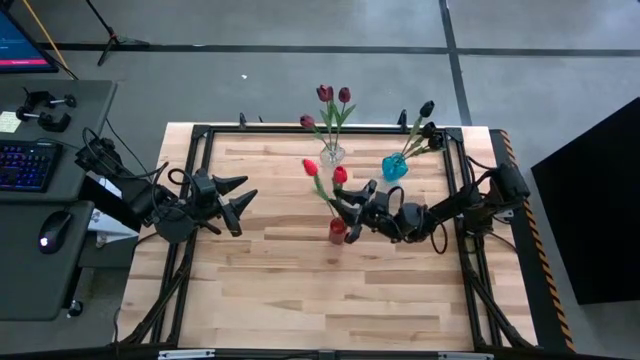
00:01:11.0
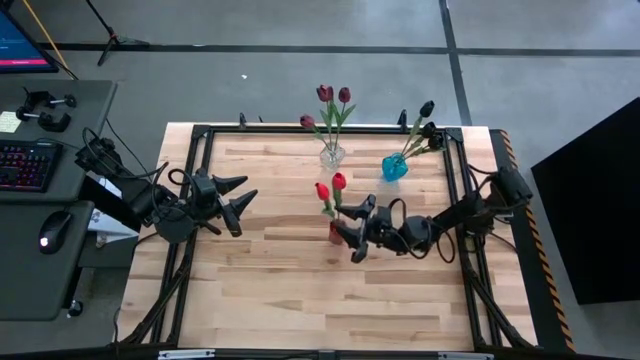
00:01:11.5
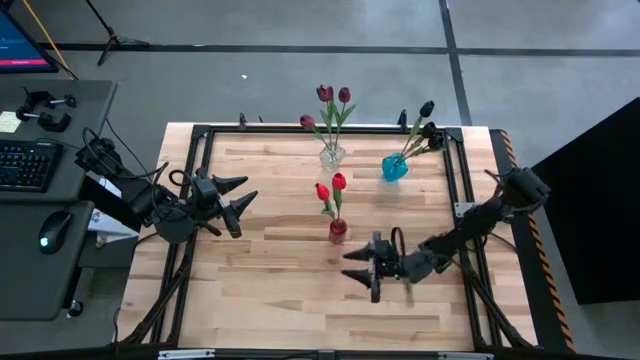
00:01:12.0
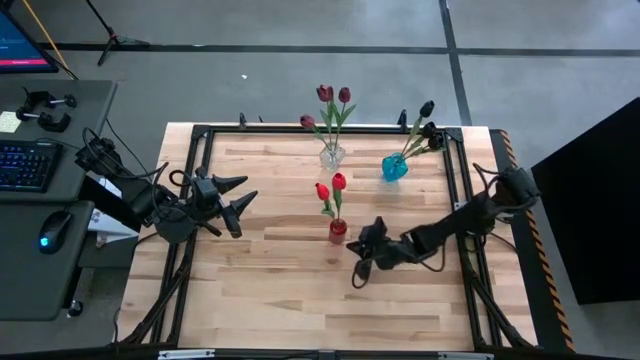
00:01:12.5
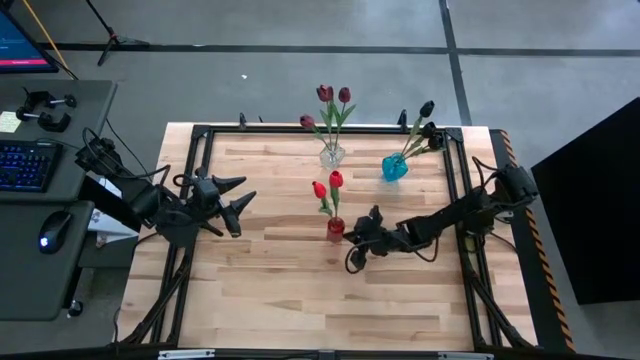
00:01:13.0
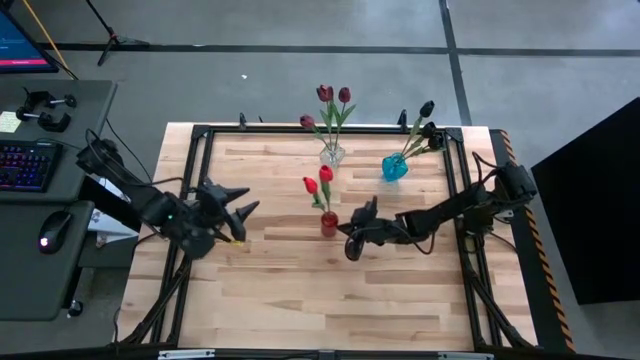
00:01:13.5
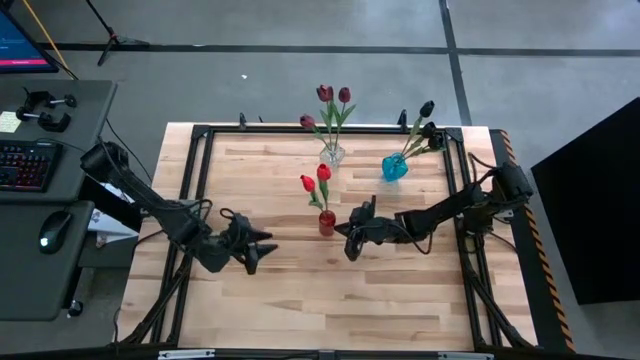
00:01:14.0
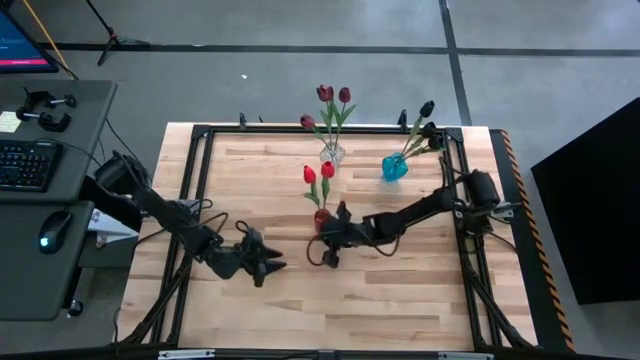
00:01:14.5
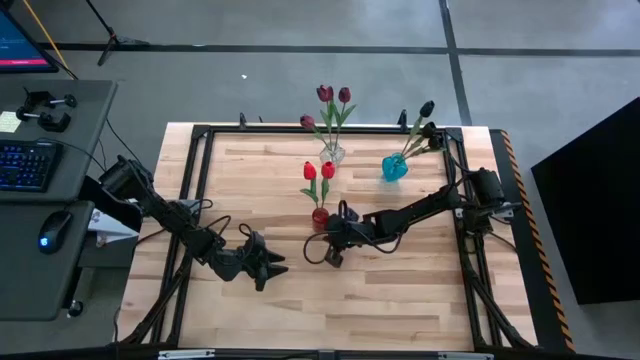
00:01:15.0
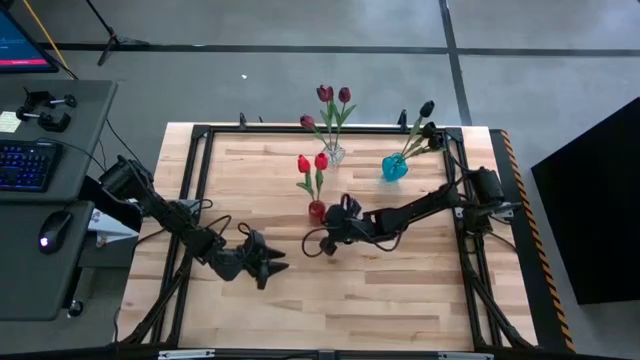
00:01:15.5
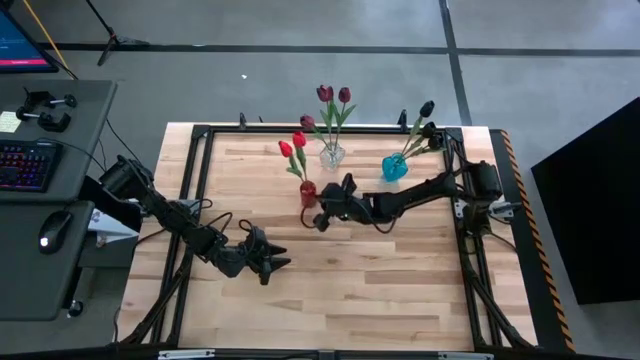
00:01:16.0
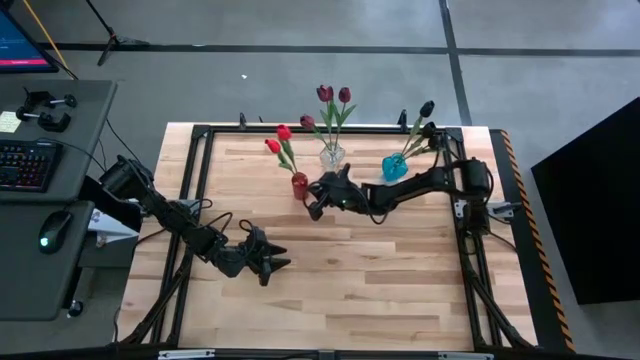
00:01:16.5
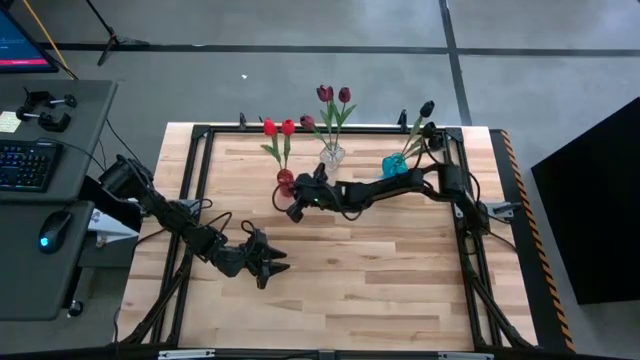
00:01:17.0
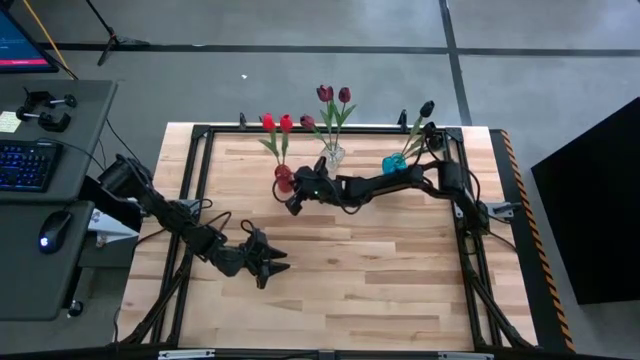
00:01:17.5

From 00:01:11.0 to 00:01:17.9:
Task: Sort flowers into vase by color
Move the red vase to the top right of the table

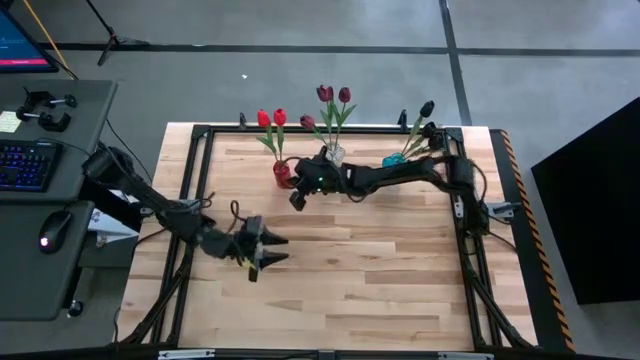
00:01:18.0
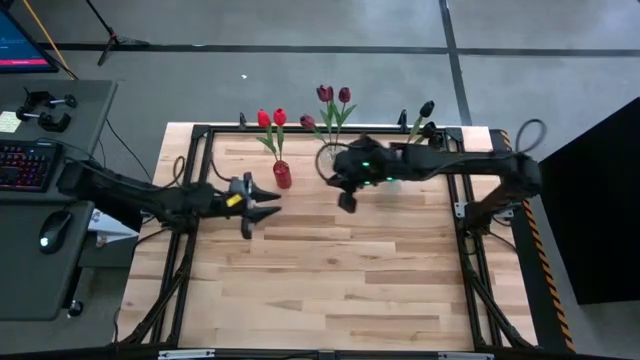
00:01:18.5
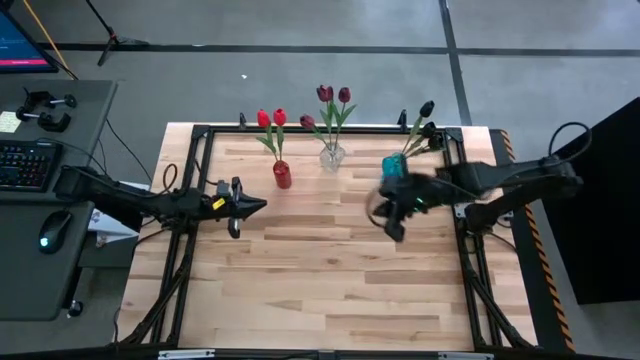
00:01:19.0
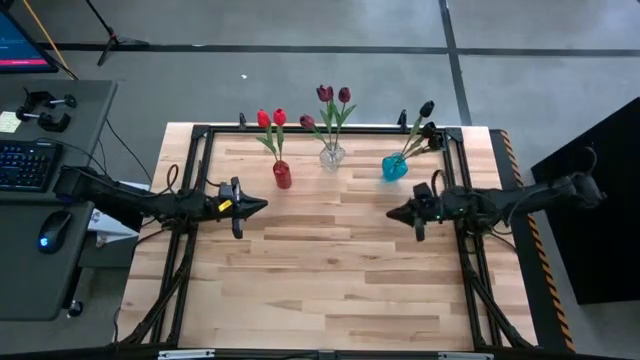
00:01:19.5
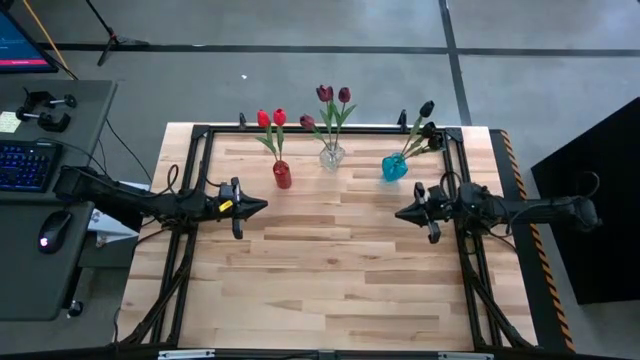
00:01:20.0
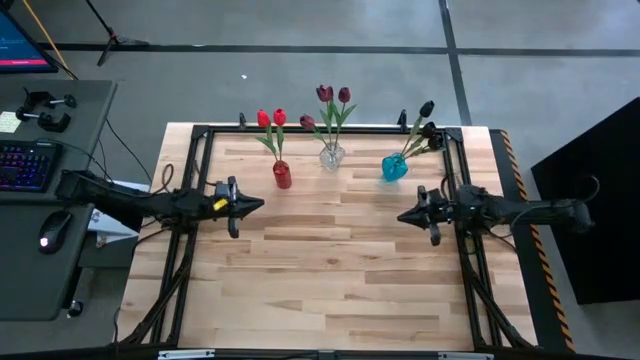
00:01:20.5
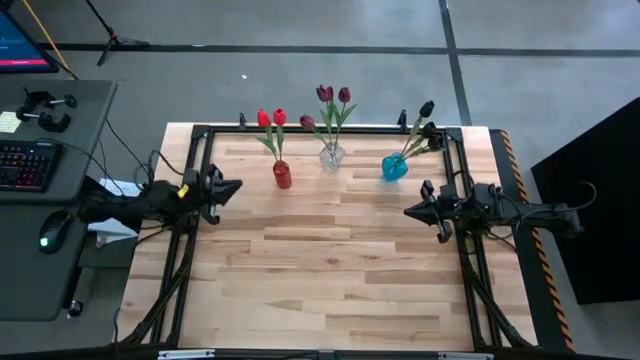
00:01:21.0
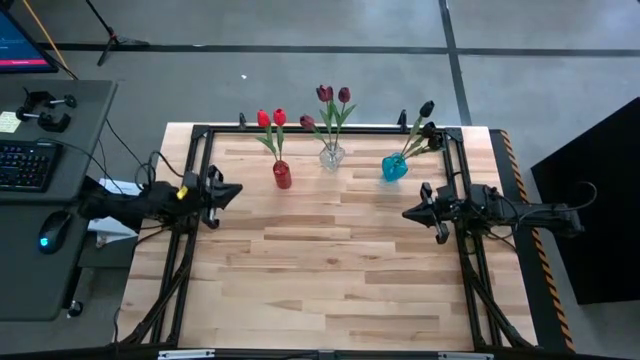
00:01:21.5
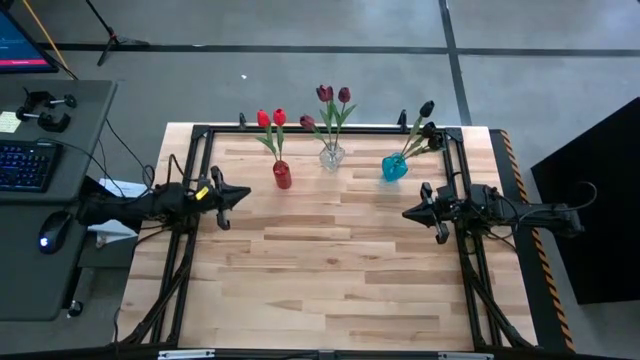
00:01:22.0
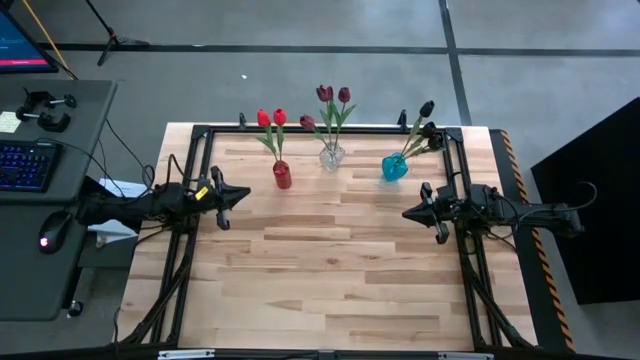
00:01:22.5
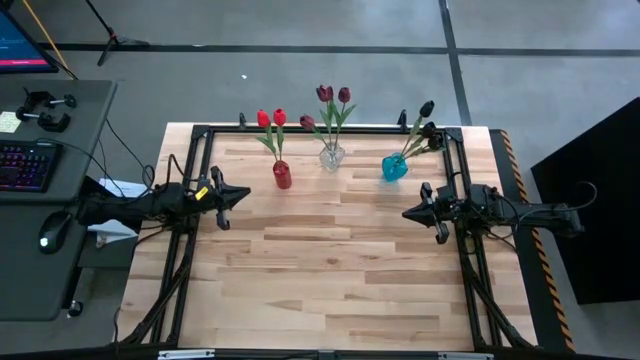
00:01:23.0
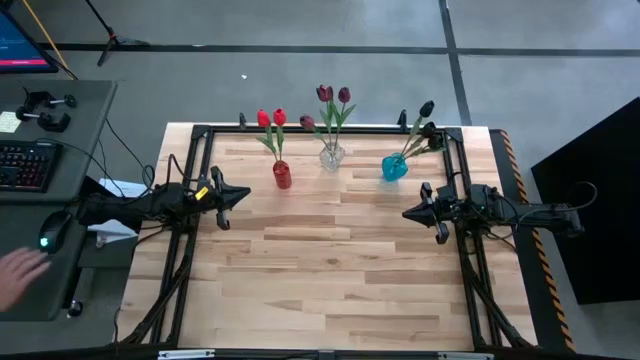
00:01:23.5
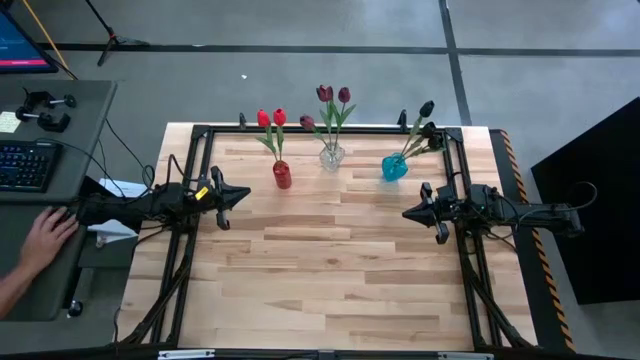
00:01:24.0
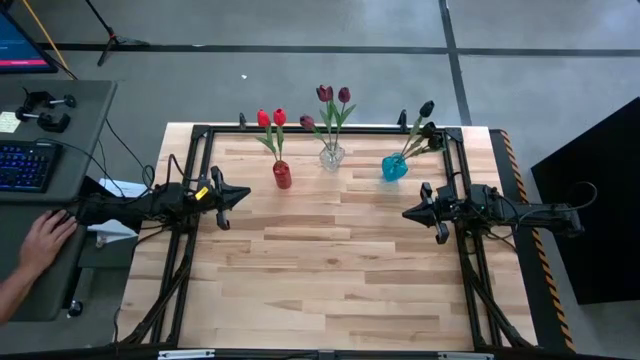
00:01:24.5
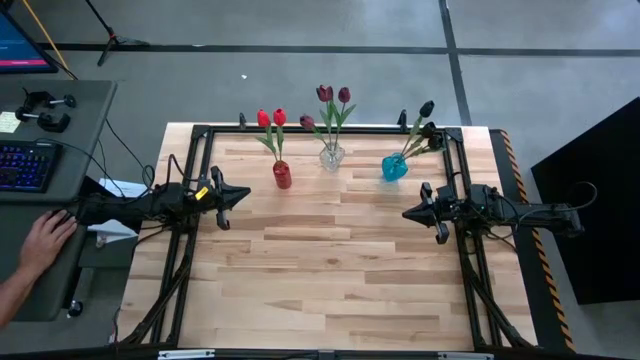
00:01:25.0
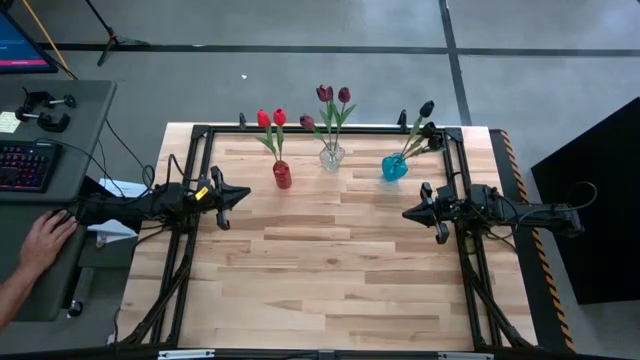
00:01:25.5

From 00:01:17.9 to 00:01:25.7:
Return to Home Position

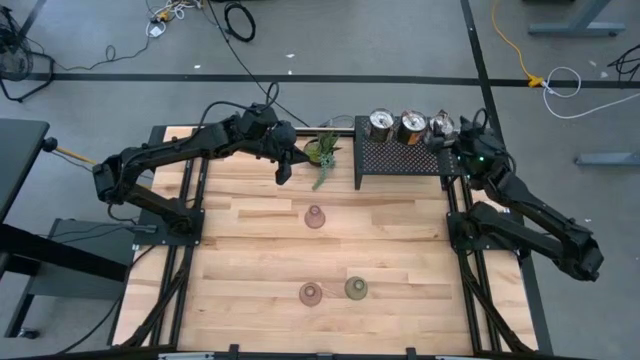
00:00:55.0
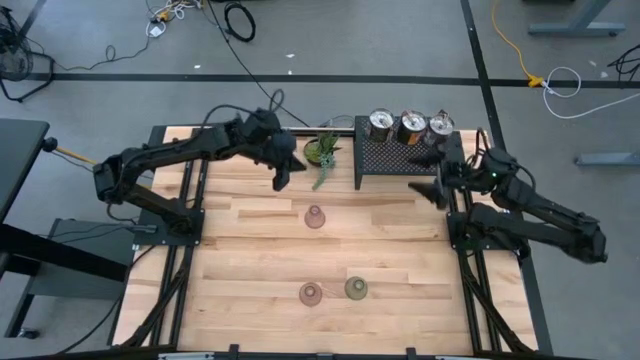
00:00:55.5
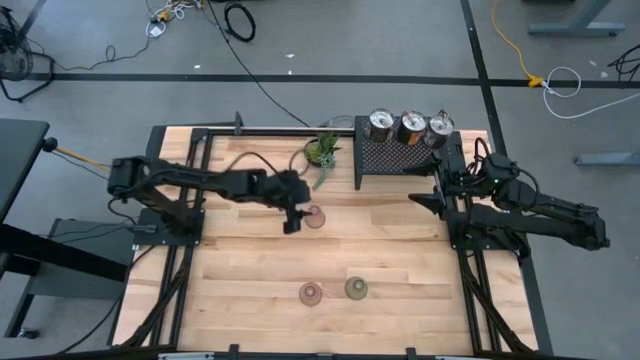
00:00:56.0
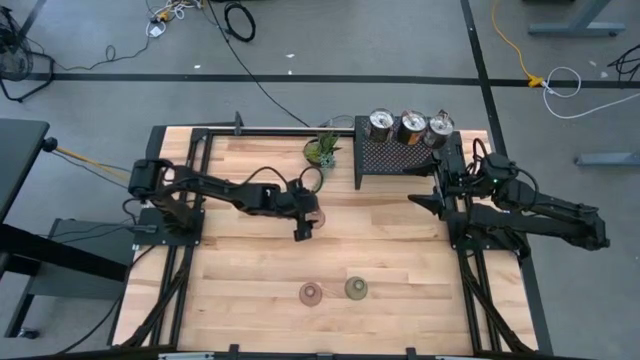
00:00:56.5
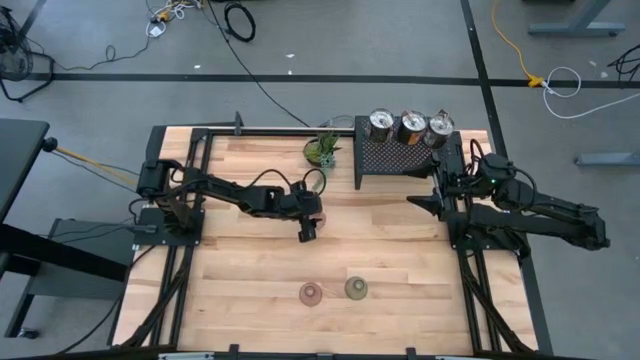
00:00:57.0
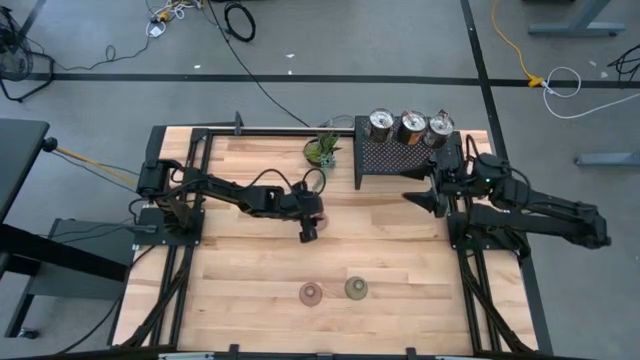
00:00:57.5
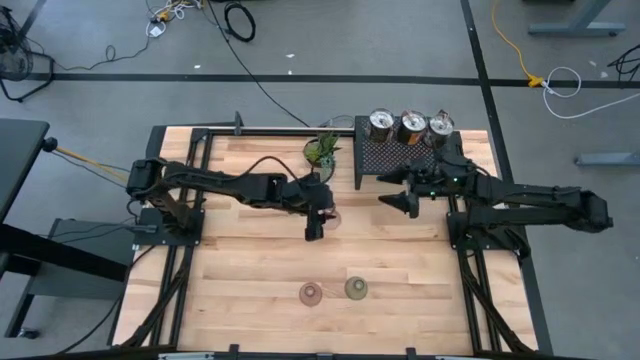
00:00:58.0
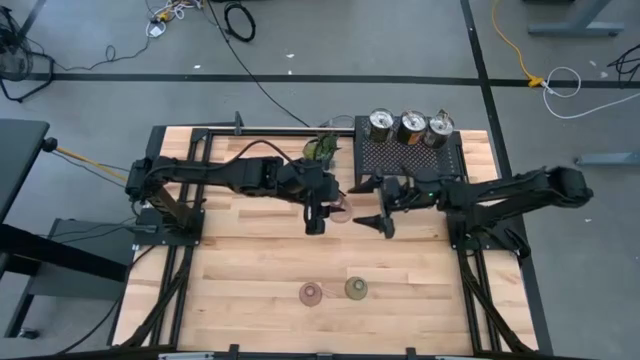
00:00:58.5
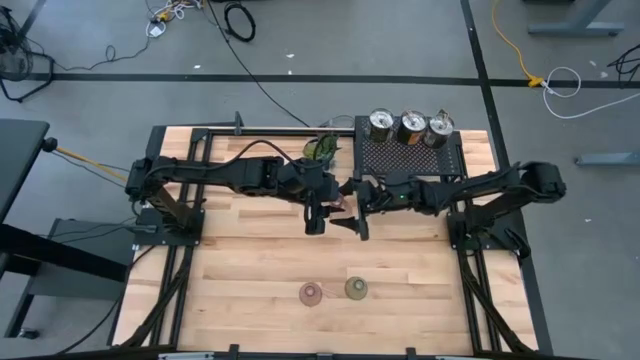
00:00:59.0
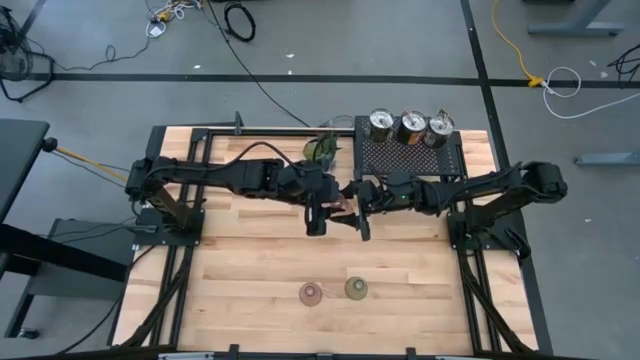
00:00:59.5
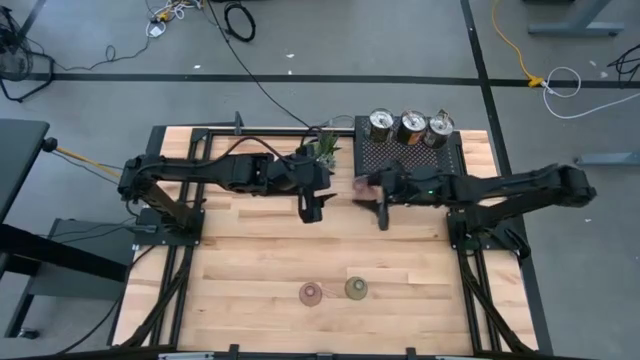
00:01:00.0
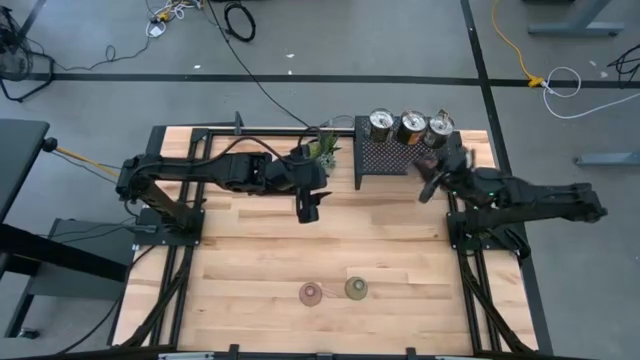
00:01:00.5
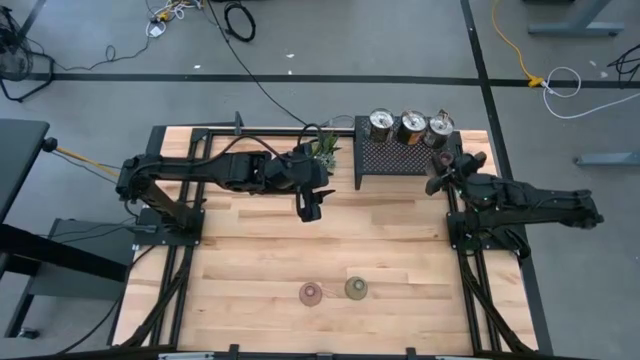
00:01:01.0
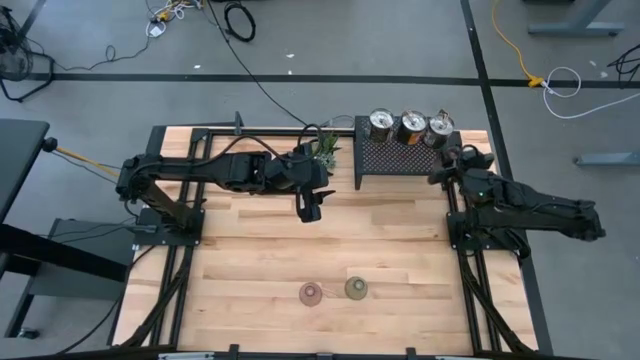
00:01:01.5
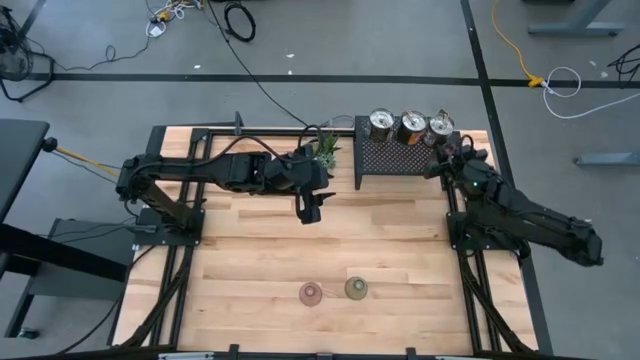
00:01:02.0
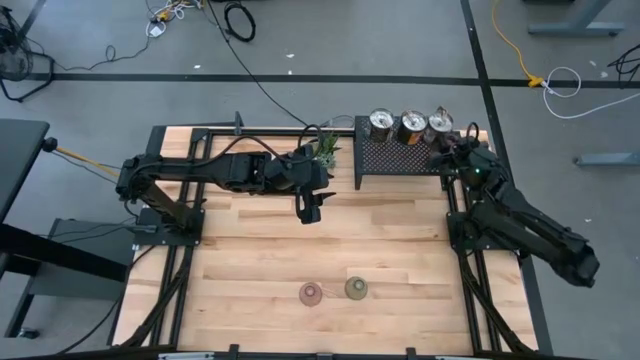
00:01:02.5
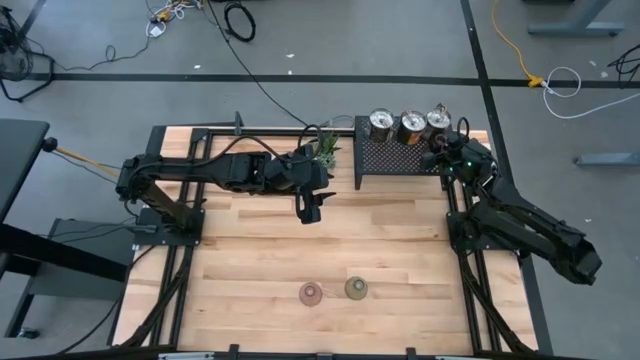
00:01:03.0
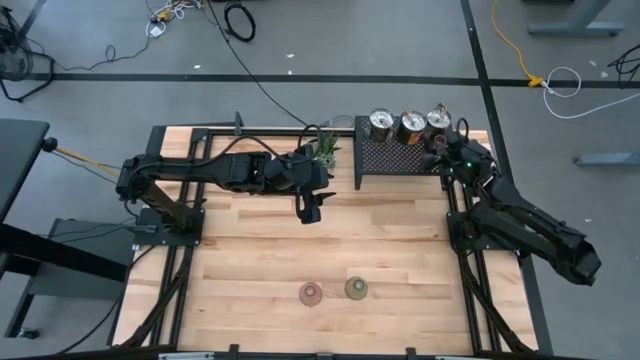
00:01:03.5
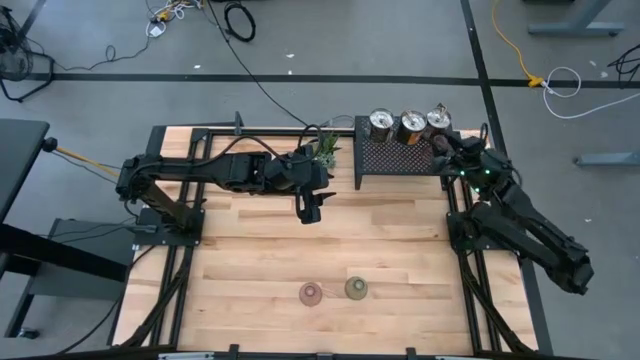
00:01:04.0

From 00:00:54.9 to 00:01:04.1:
Task: Pick & Place candle stick holders
Put the top pink glass candle holder on the shelf
